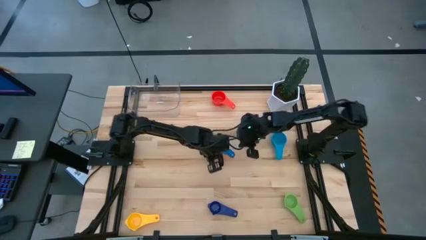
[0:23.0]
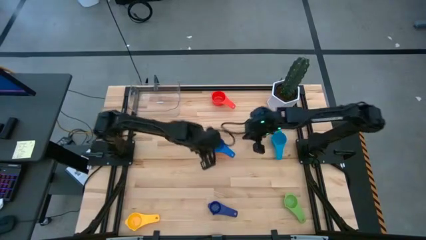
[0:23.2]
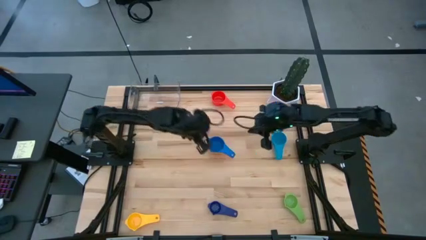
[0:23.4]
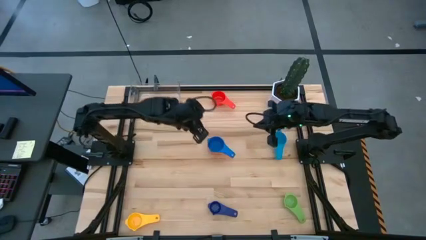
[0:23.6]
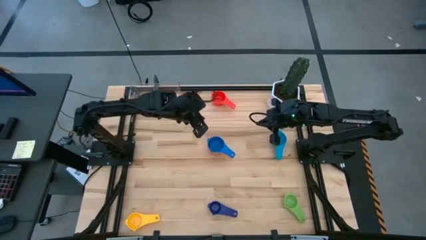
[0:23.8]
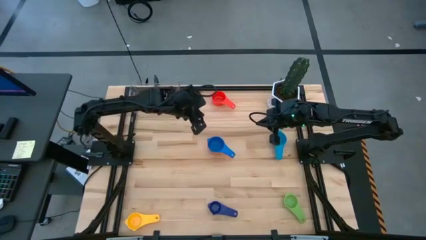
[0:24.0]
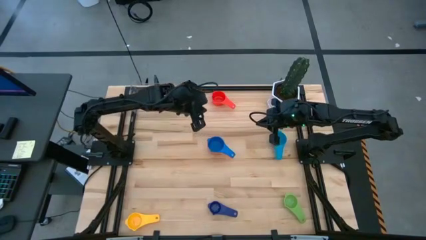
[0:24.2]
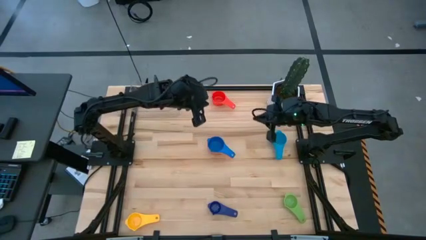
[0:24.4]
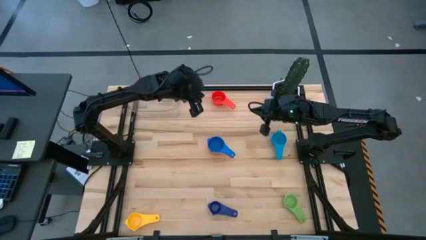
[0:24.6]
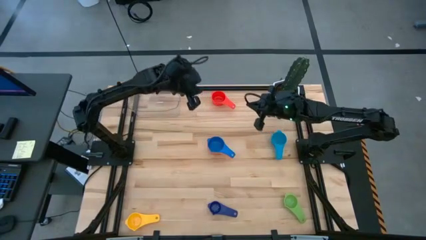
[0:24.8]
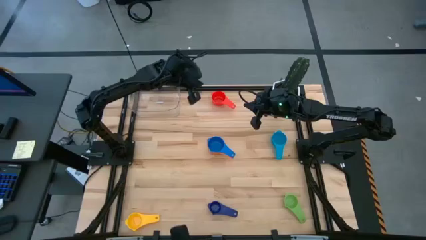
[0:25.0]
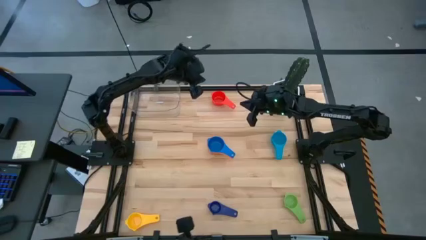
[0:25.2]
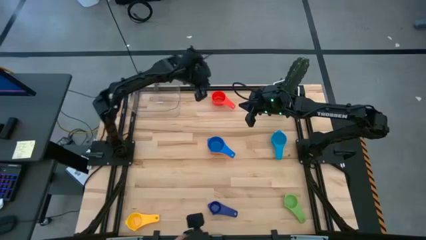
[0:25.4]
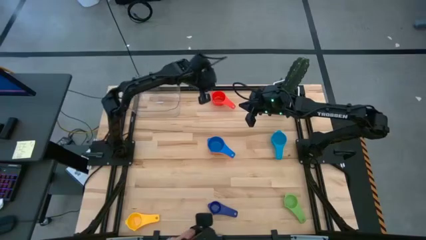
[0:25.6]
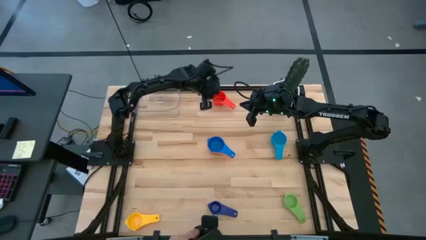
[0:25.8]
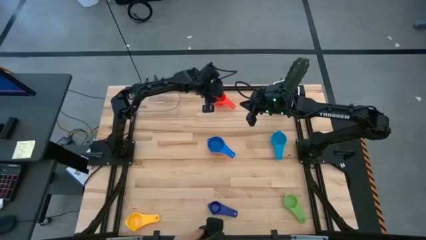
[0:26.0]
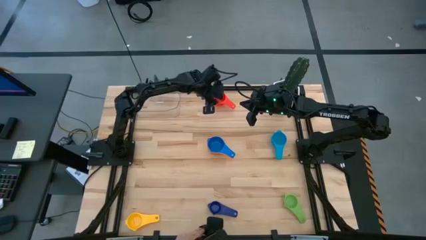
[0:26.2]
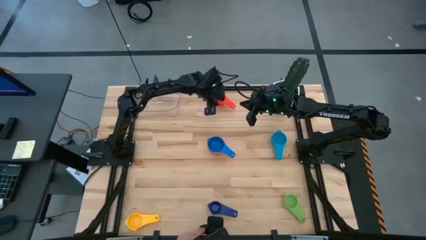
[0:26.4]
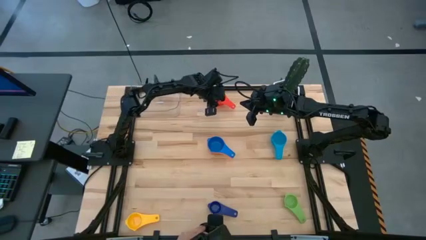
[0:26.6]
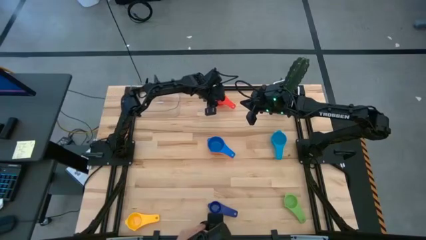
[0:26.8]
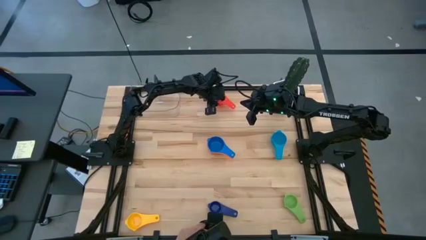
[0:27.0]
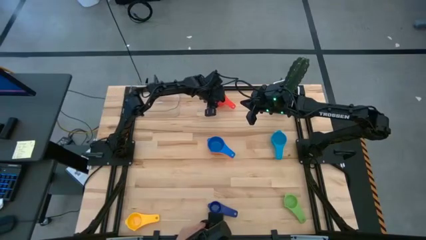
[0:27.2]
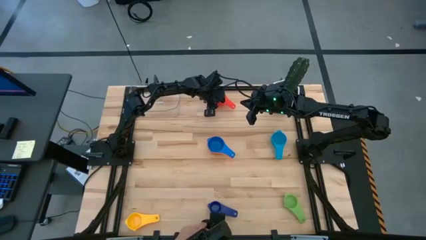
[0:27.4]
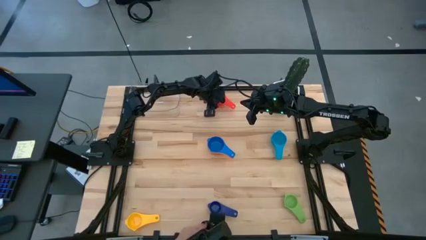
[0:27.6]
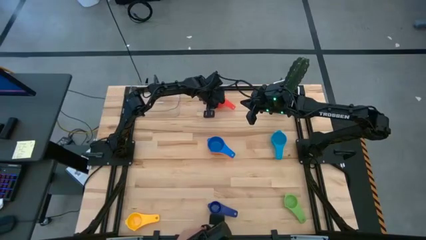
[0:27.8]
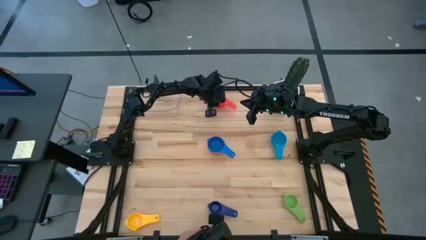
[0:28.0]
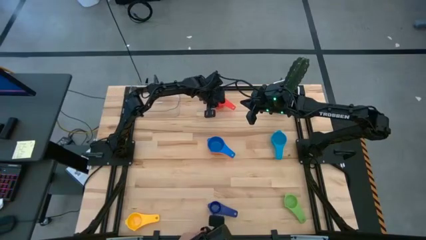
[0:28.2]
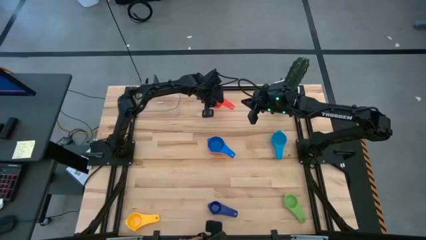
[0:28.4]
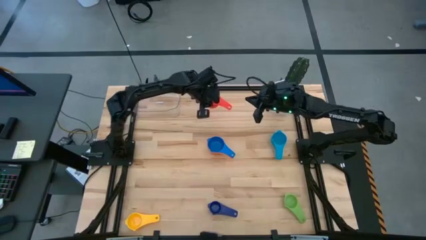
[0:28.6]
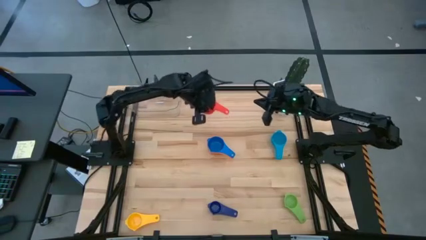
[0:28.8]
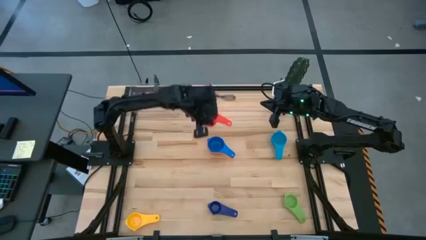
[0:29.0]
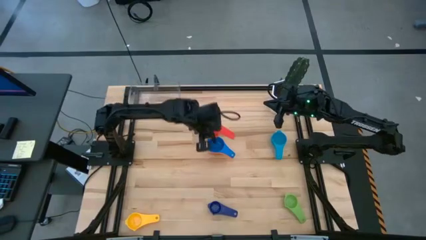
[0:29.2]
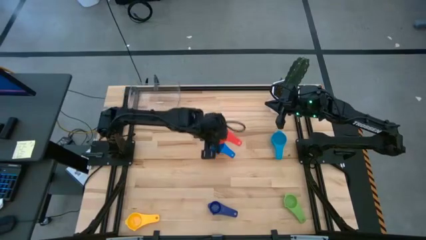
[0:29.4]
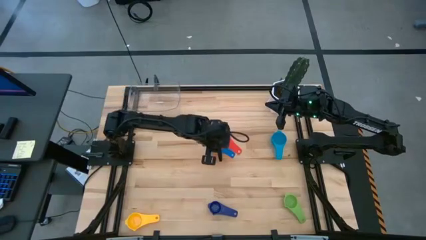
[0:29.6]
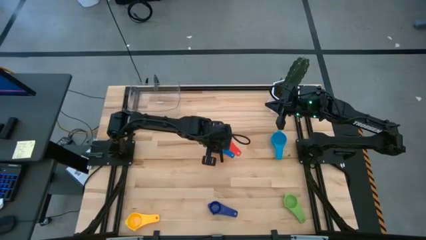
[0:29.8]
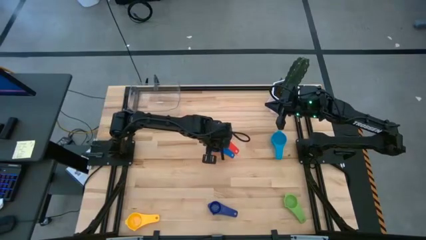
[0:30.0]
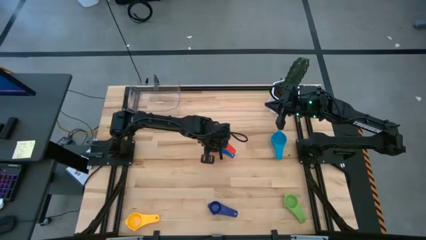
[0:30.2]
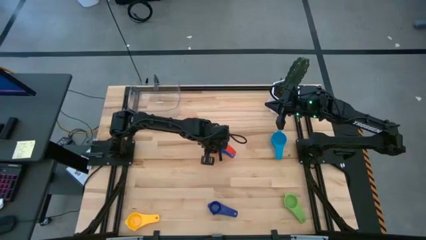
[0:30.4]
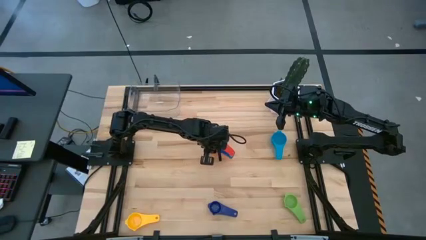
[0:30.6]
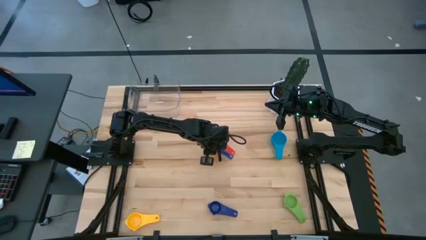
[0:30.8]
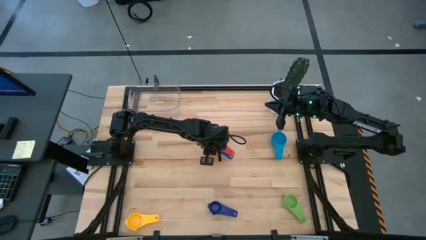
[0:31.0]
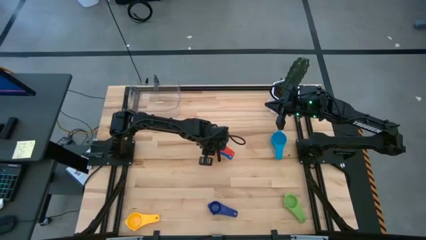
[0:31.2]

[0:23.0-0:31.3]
Task: Nest measuring cups in basket
Stack the red nest measuring cup on top of the blue nest measuring cup
